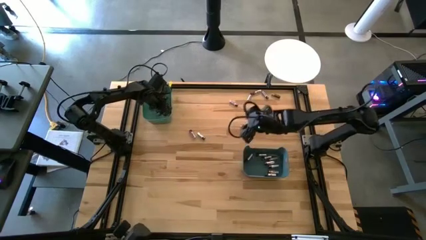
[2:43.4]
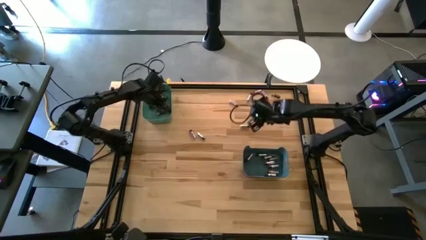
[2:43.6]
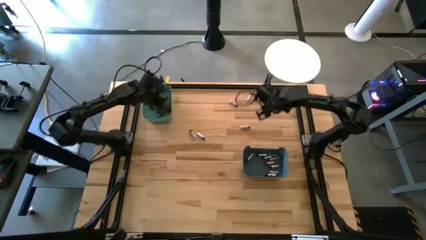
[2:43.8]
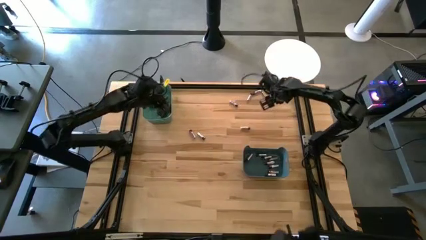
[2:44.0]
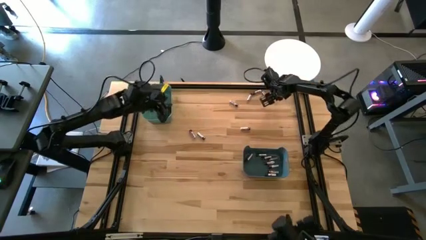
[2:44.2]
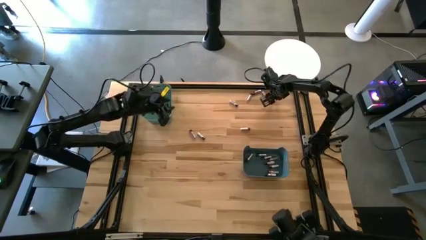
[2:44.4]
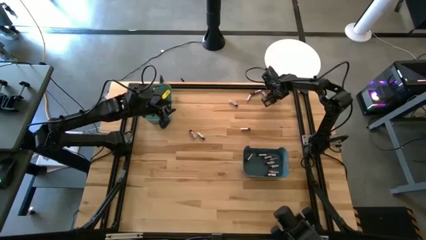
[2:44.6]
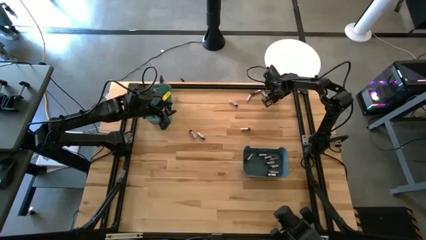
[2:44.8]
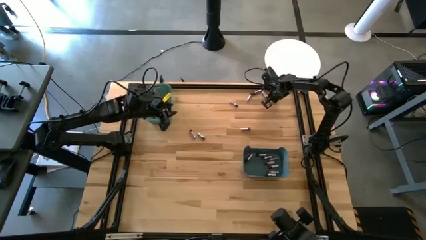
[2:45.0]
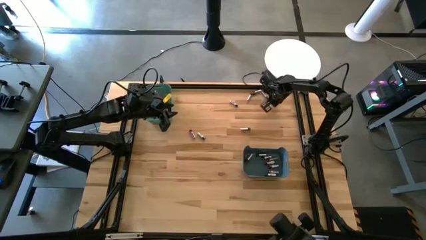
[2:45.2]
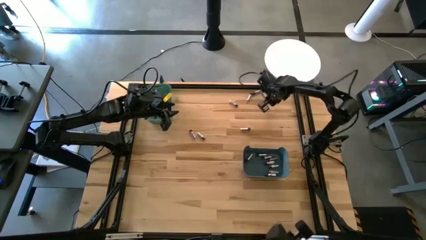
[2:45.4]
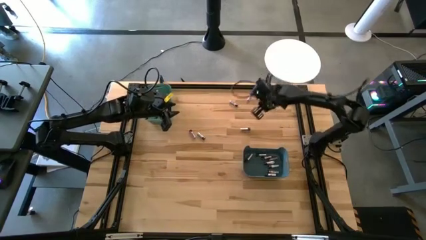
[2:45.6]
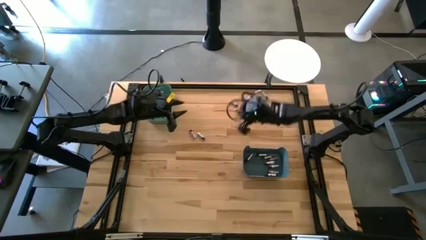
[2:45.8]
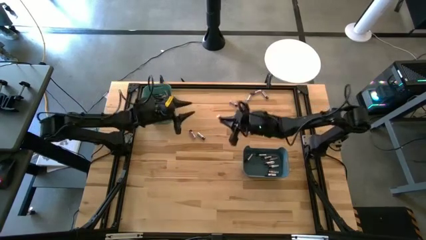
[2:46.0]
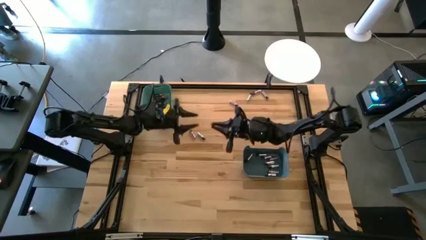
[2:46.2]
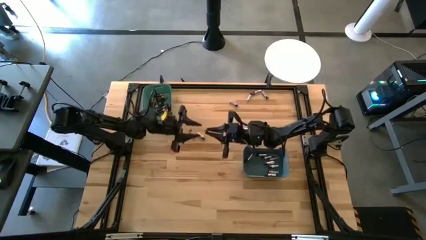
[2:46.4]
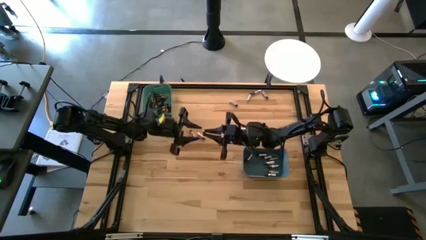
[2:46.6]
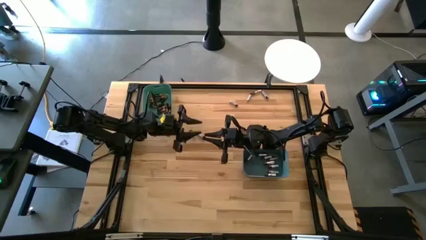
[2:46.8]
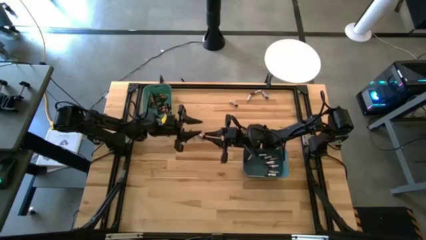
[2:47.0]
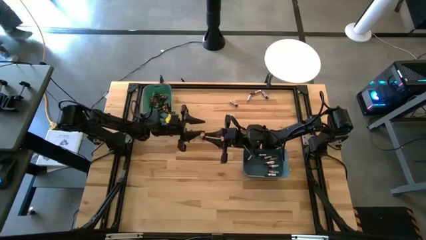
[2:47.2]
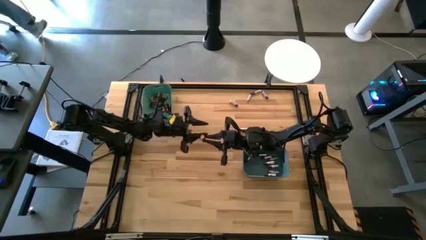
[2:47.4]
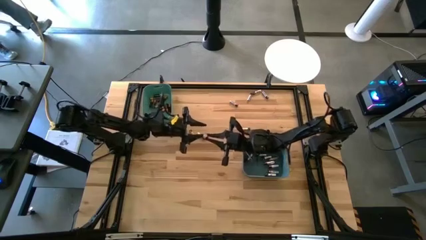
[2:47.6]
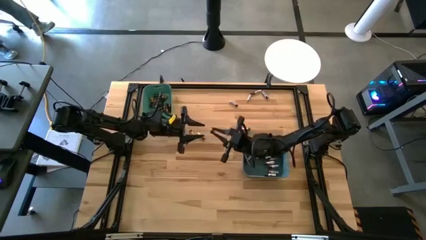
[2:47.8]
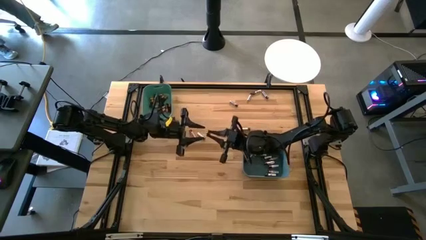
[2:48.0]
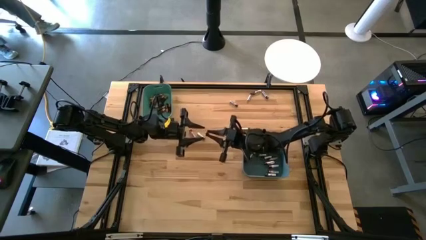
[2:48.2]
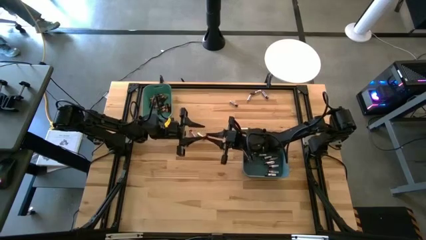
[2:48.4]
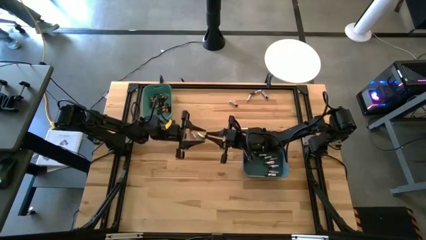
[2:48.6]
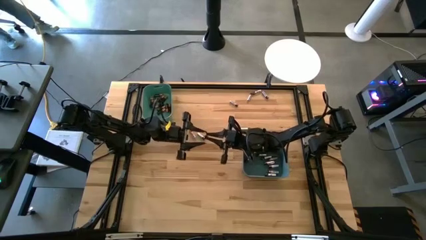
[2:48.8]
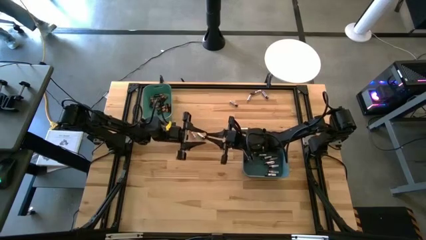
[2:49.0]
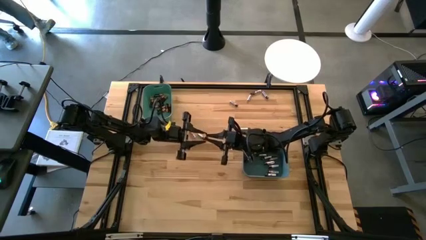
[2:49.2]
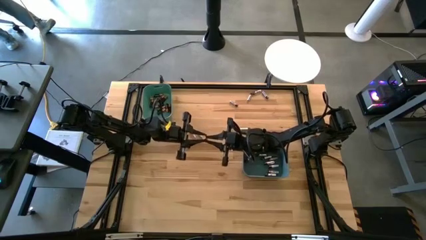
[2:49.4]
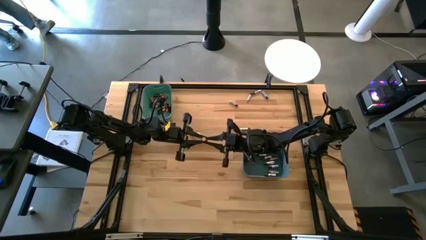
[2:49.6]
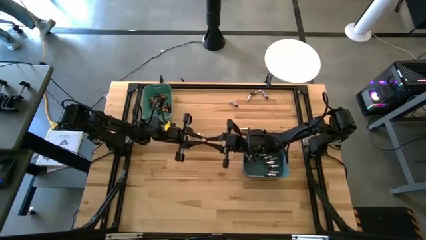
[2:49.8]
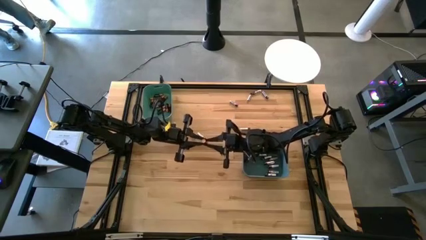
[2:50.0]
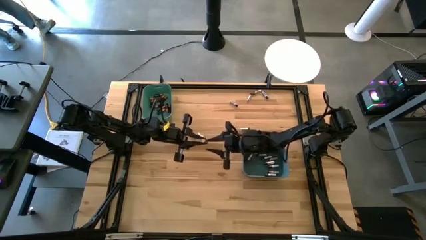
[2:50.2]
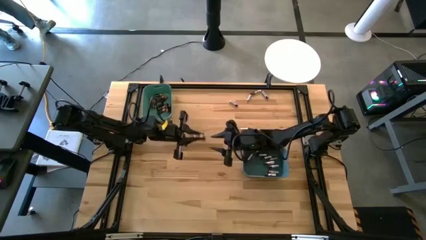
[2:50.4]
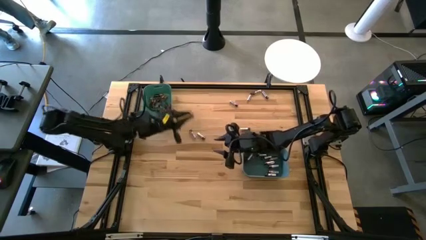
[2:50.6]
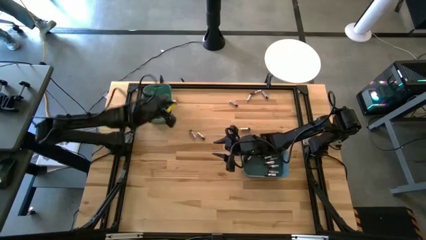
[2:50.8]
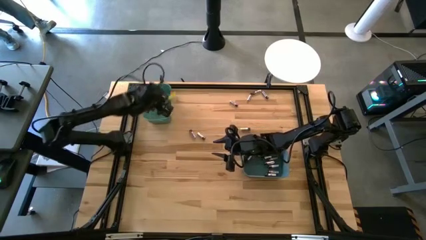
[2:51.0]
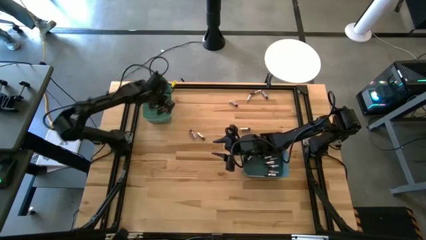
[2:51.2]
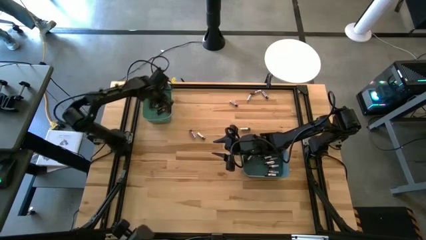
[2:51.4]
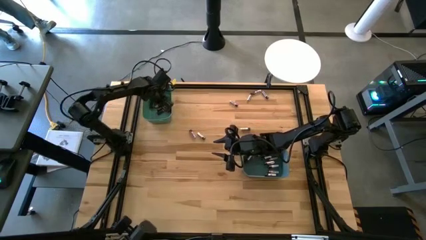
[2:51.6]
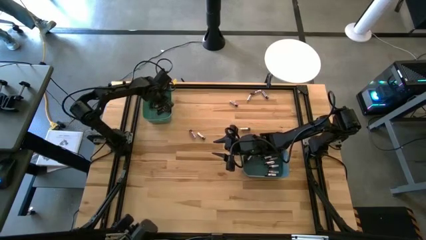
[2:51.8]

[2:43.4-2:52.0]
Task: Sort batteries
Put the black battery into the green bin

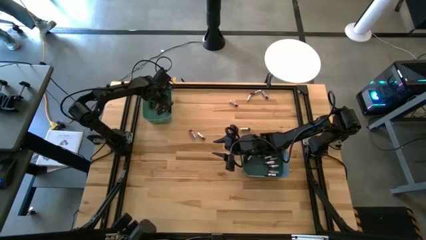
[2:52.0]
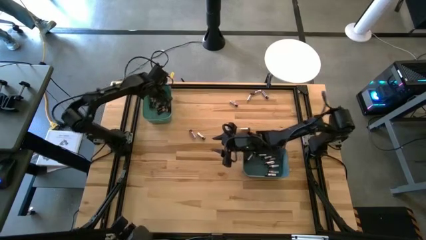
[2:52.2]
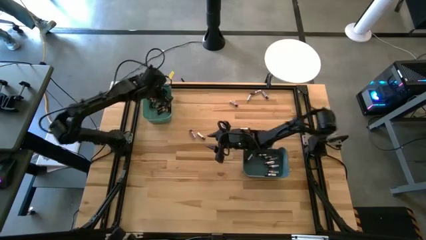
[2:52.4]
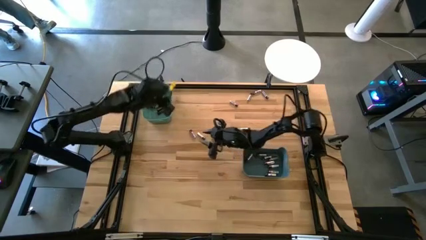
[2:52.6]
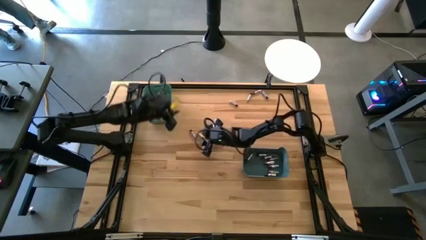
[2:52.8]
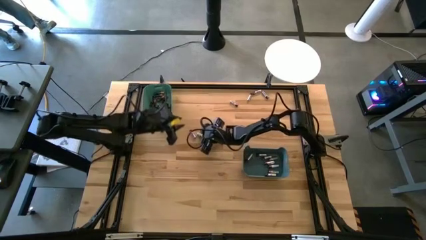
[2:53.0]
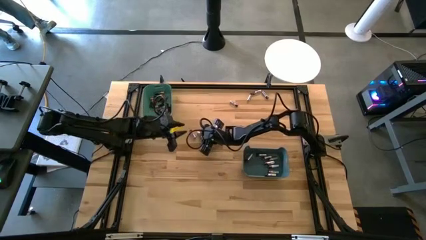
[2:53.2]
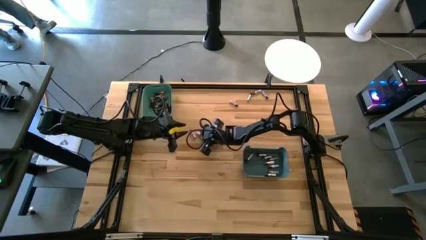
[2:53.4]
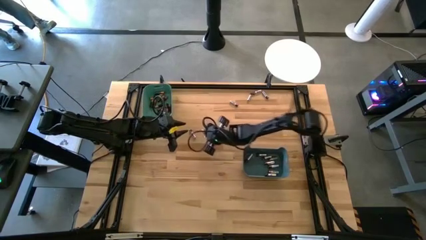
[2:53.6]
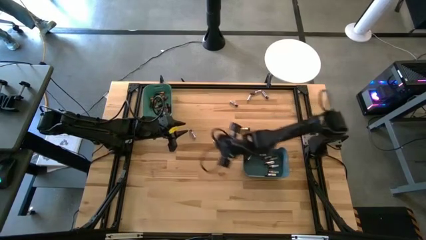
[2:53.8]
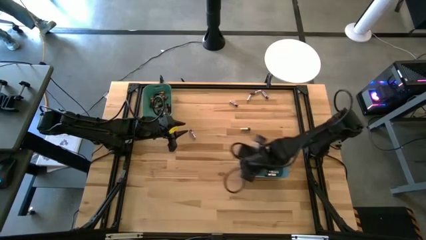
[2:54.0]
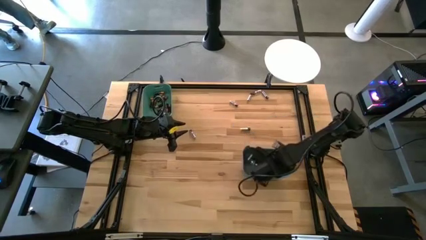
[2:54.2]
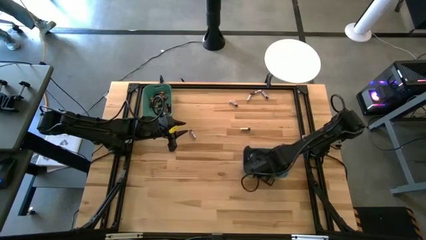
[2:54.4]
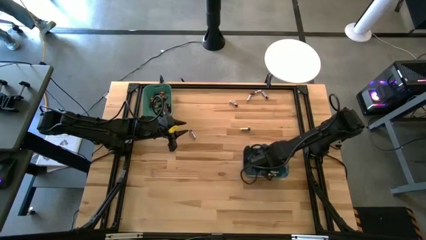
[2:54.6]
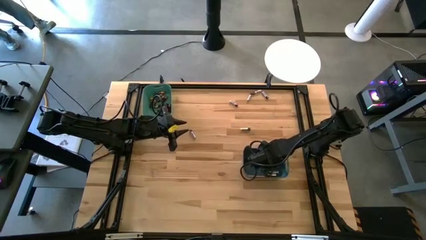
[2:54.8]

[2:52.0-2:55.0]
Put the silver battery into the blue bin

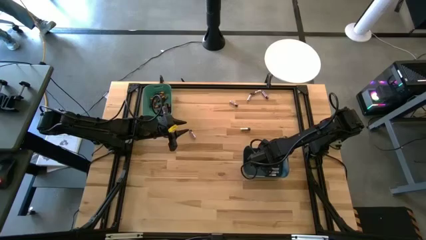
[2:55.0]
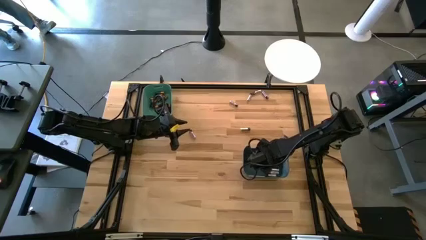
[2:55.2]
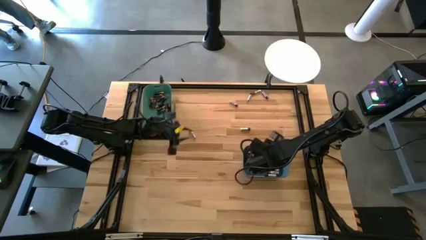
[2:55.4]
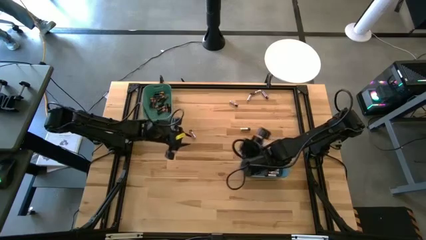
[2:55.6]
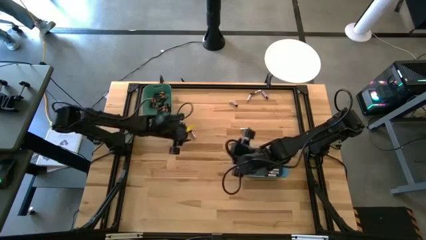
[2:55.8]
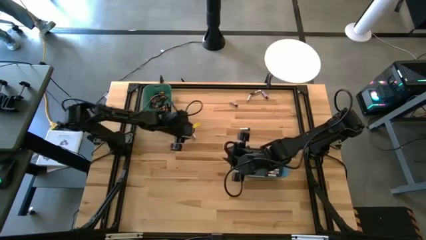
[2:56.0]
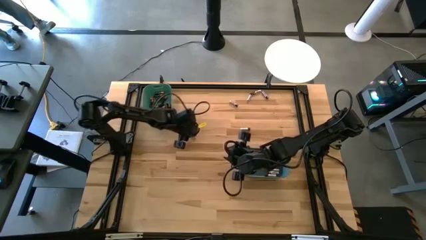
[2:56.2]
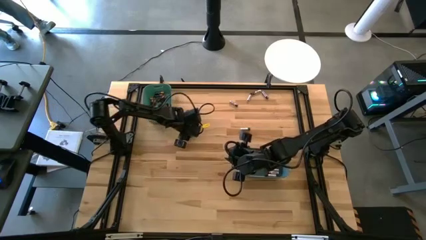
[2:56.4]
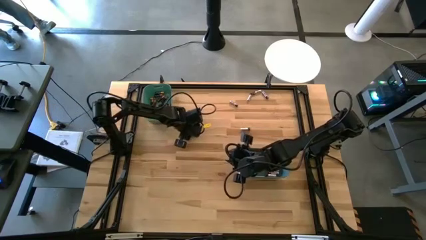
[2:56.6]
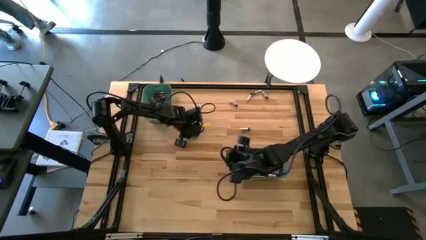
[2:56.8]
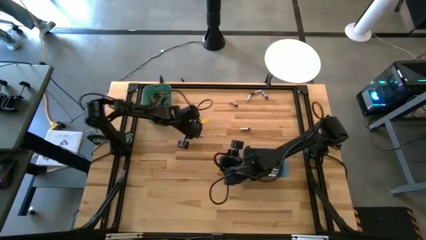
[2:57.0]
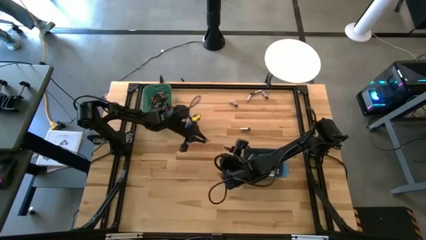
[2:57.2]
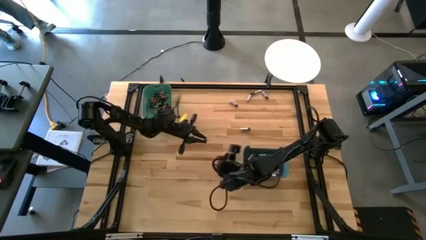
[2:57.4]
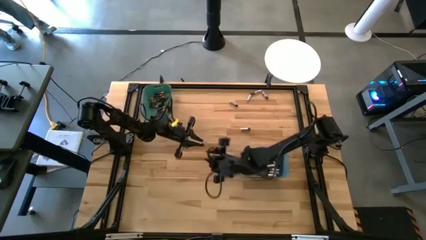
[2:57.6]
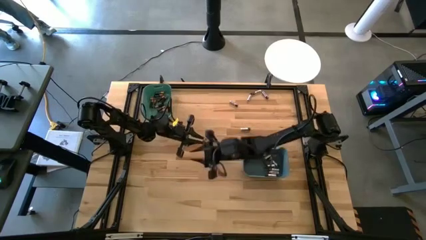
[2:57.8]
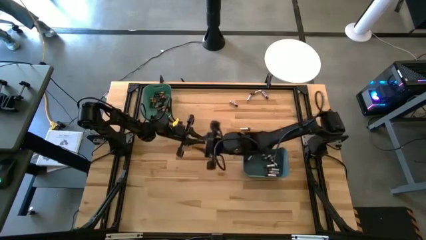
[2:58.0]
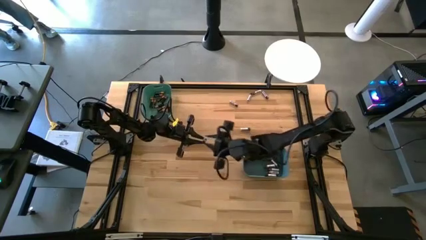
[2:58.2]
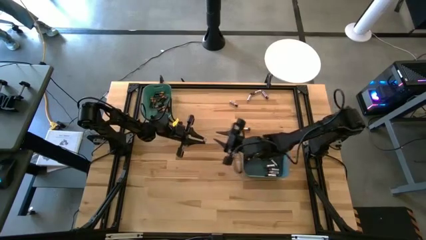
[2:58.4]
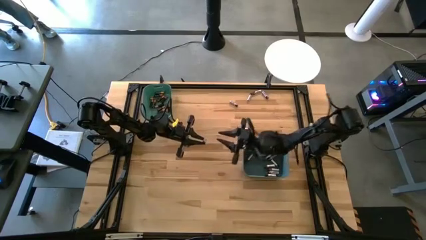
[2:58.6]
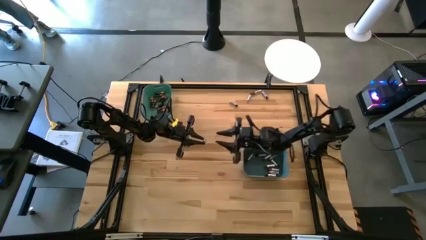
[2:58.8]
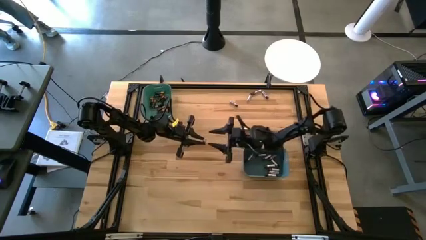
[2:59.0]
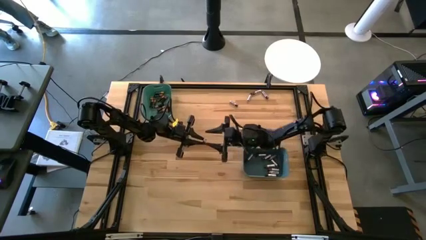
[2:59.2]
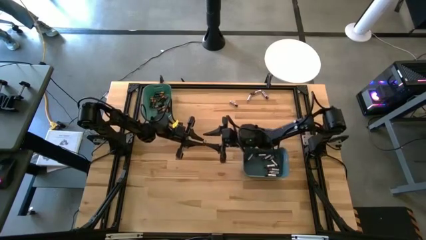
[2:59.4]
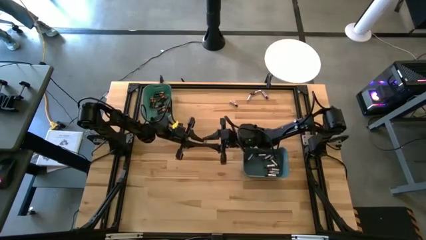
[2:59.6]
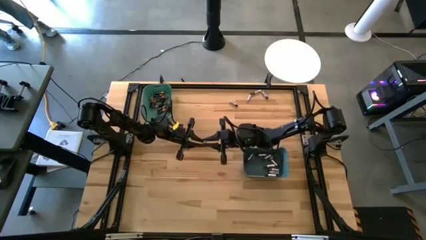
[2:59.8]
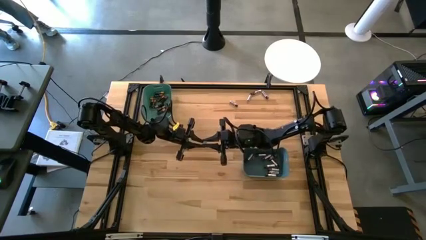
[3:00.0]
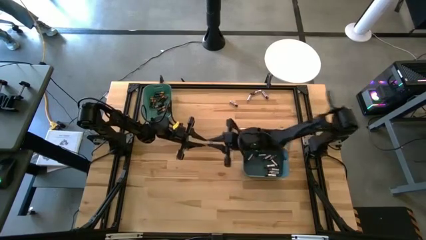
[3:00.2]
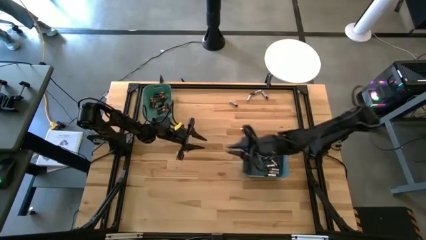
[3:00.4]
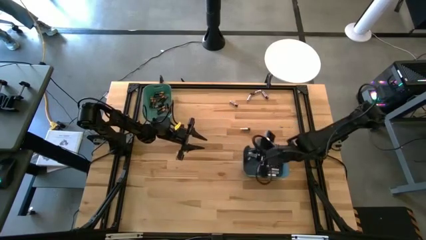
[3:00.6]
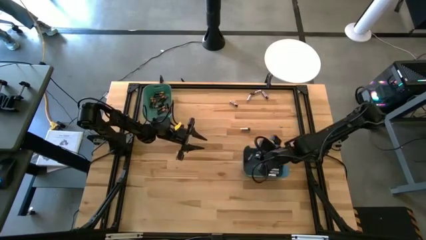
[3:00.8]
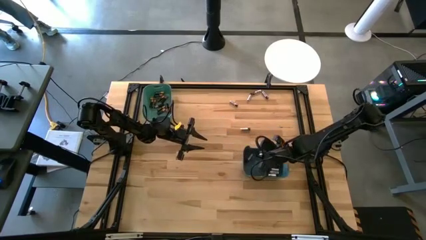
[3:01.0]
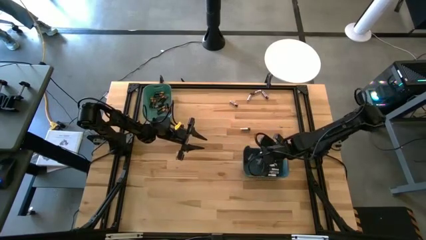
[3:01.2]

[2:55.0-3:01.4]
Put the silver battery into the blue bin
